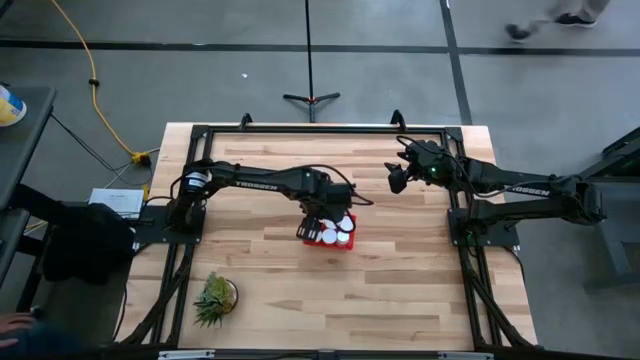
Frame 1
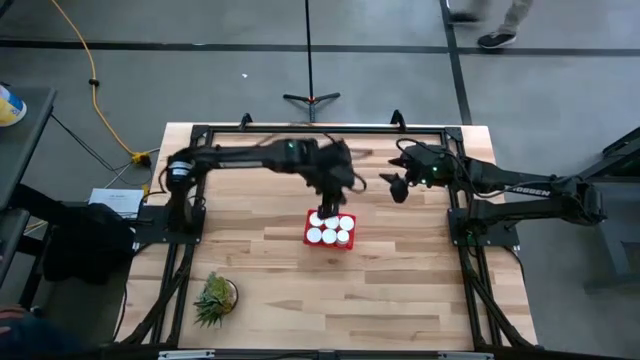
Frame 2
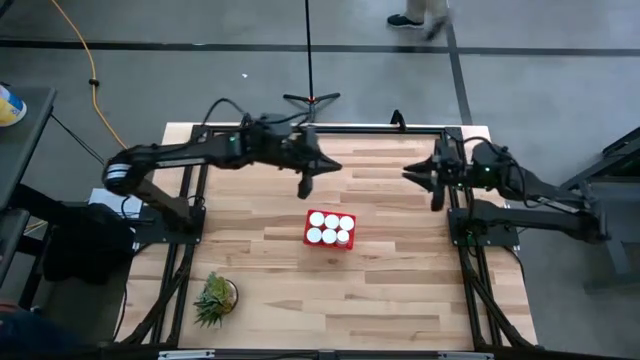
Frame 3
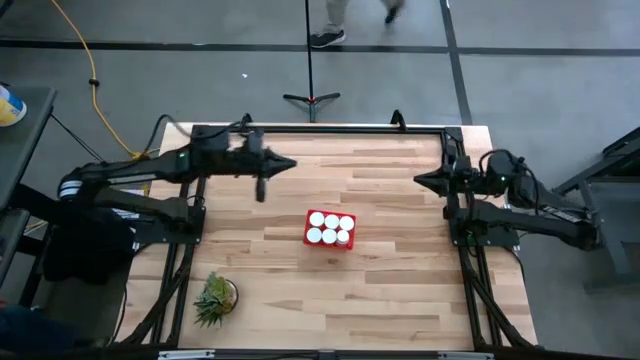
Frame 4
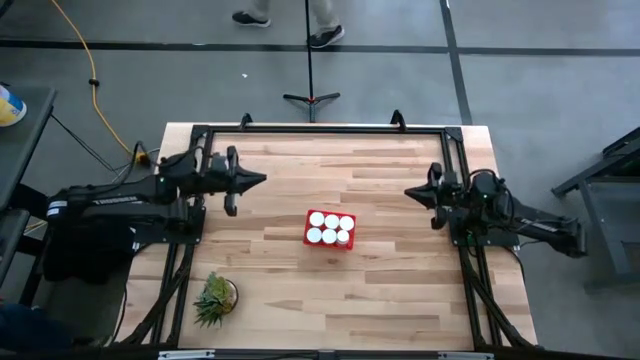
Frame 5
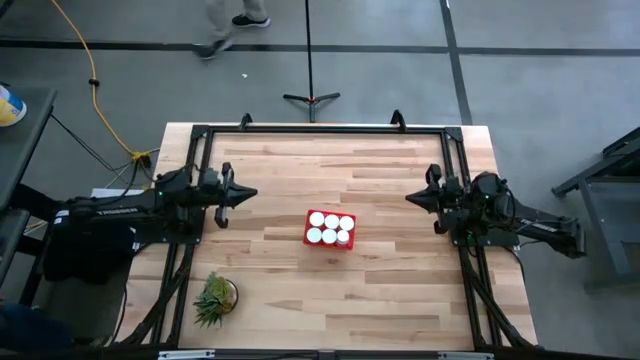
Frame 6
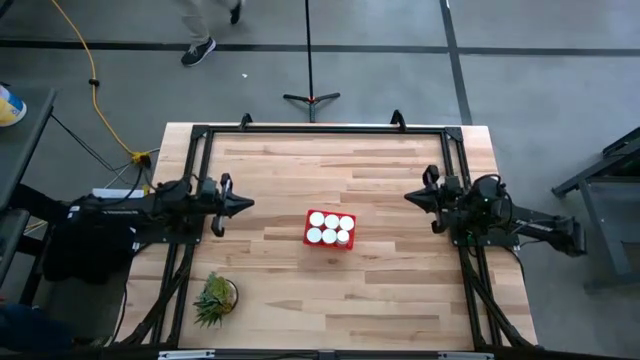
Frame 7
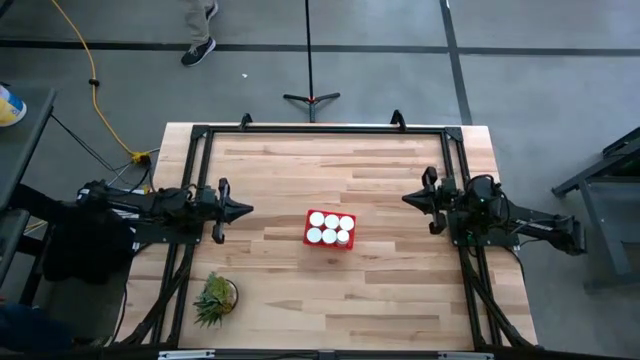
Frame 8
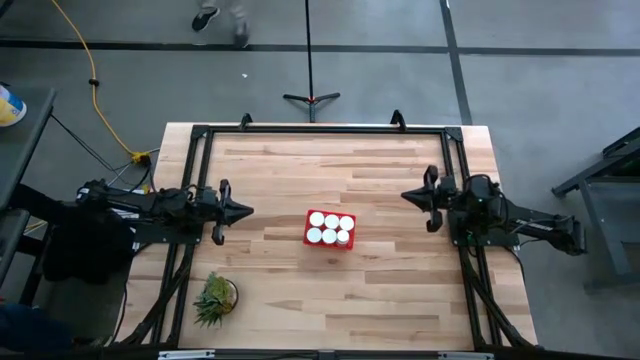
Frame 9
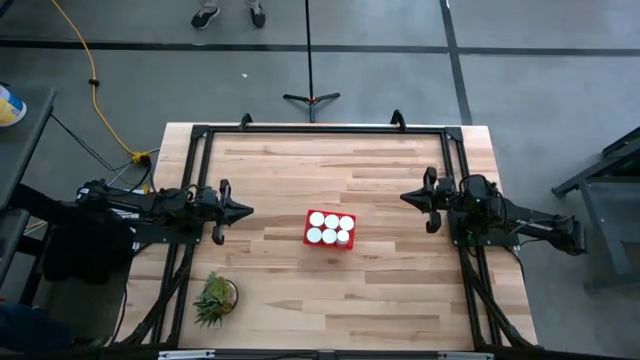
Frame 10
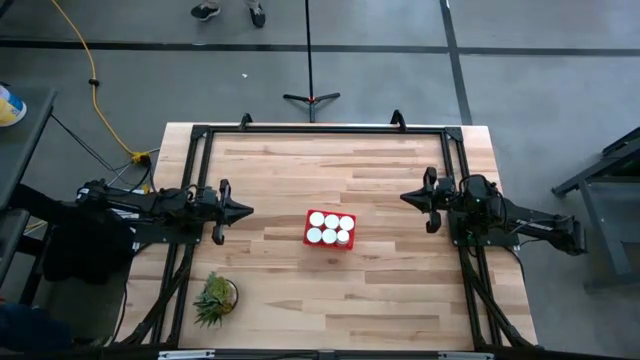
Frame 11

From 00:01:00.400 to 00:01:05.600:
Task: Pick and place pill bottles into a basket
Return to Home Position

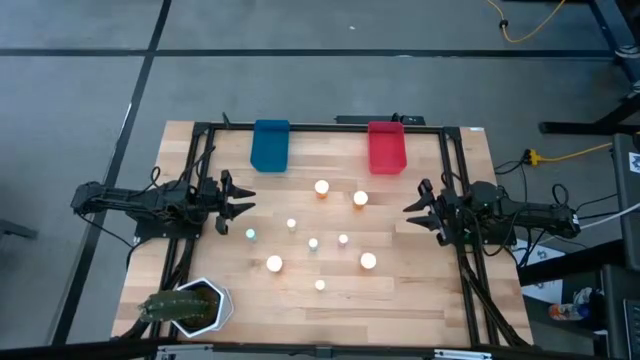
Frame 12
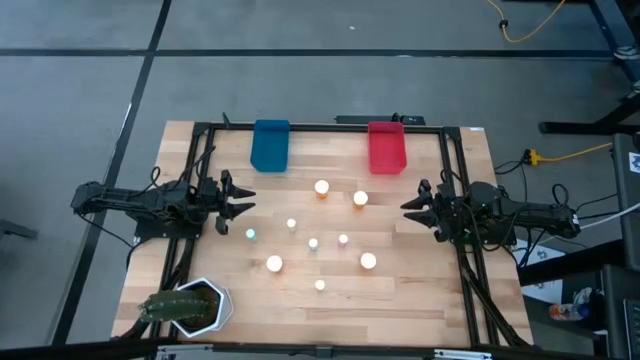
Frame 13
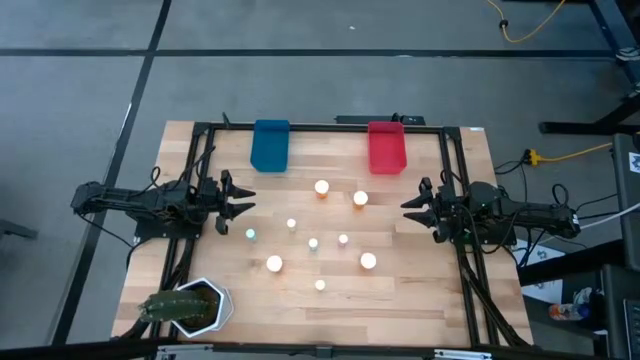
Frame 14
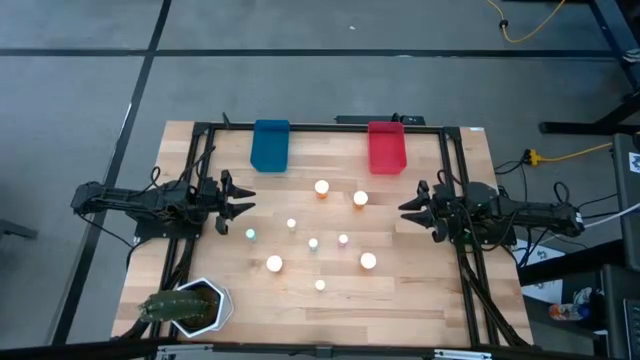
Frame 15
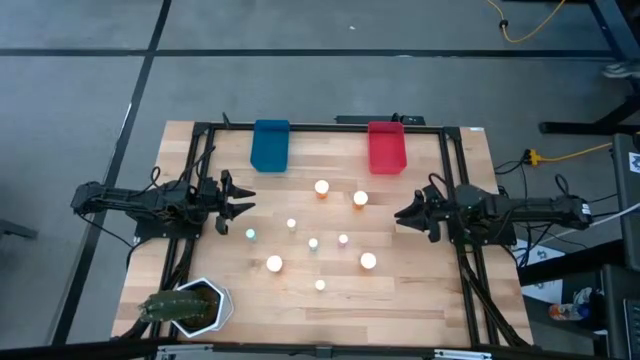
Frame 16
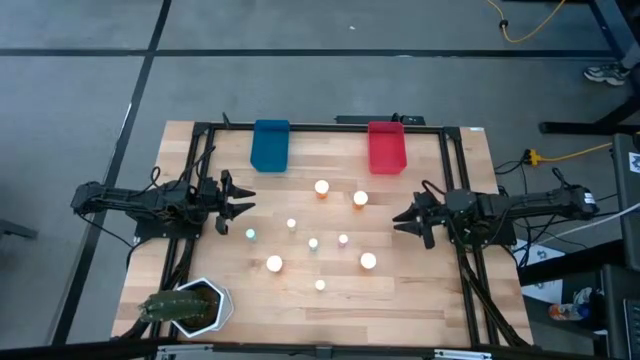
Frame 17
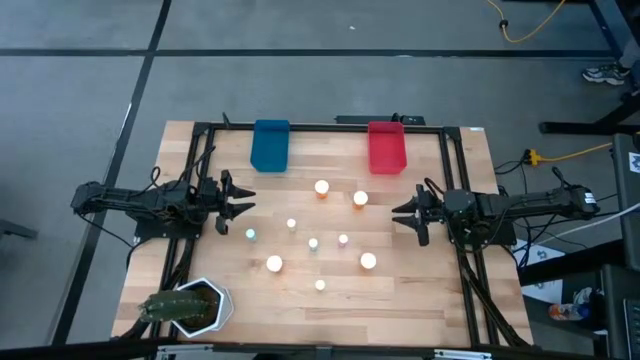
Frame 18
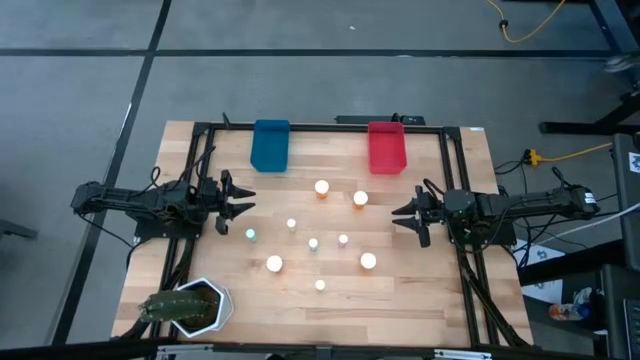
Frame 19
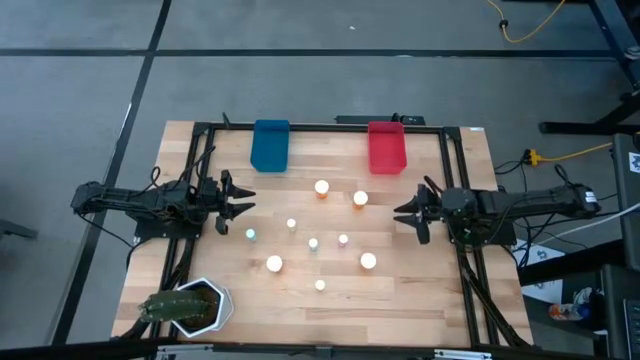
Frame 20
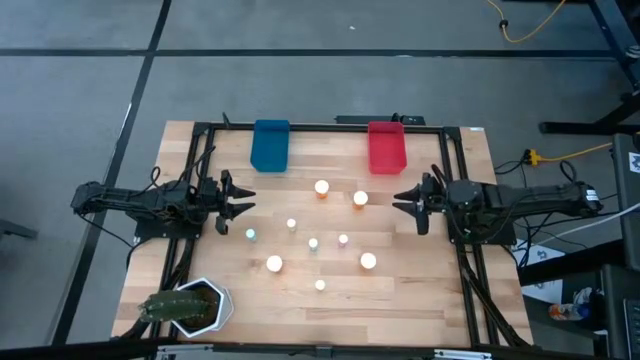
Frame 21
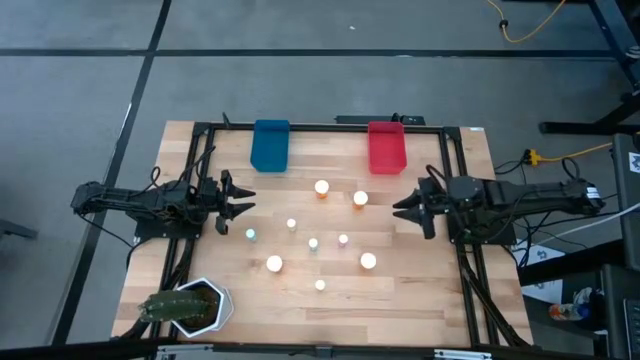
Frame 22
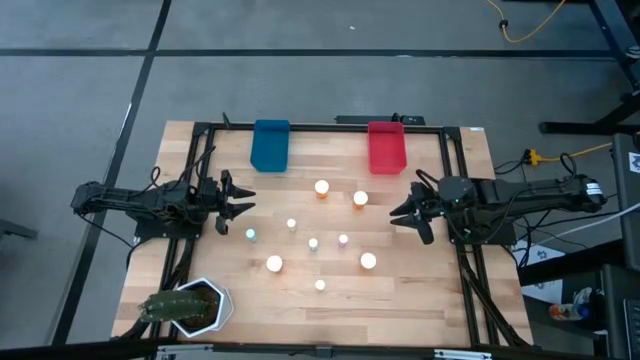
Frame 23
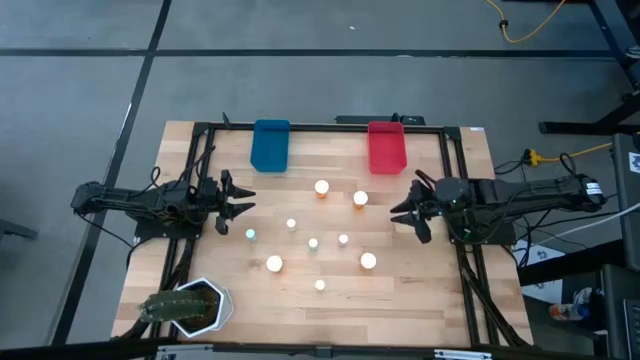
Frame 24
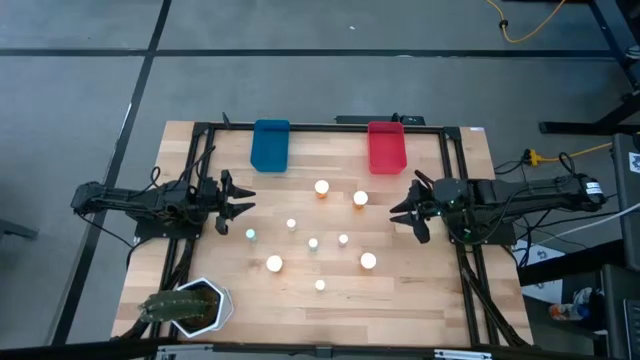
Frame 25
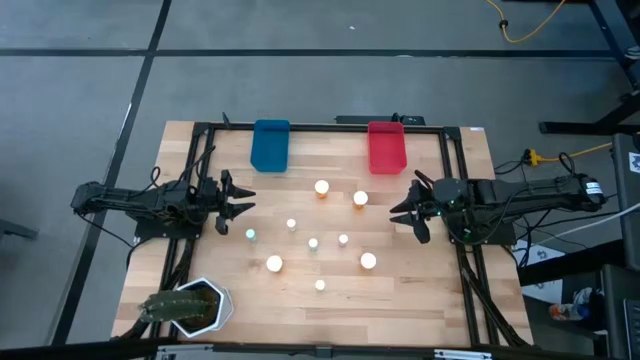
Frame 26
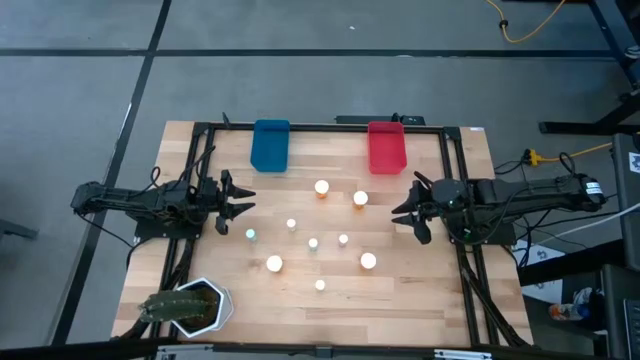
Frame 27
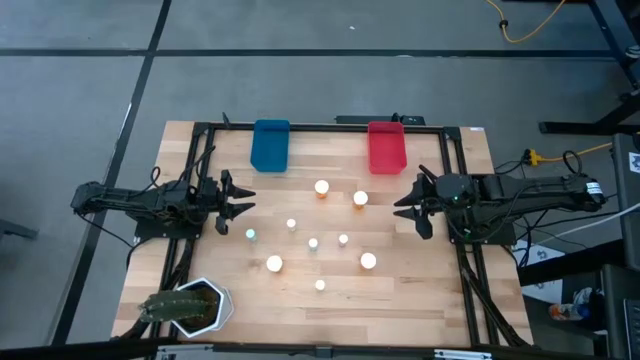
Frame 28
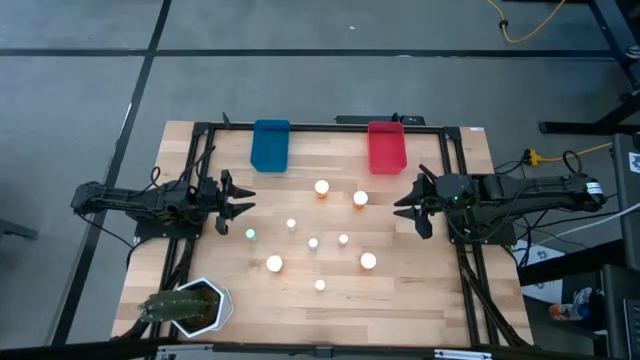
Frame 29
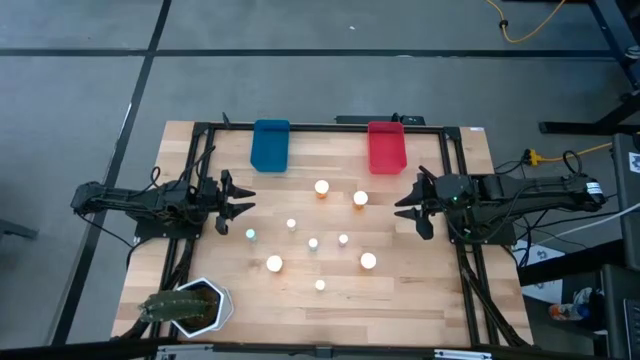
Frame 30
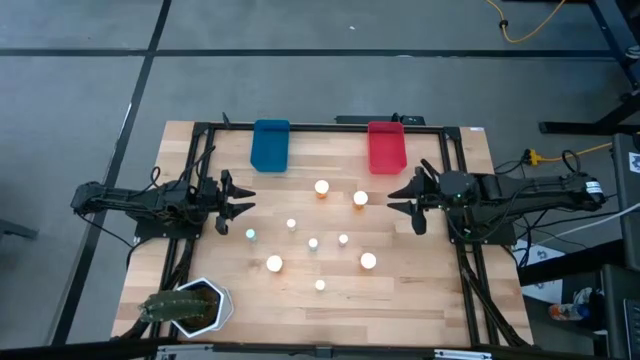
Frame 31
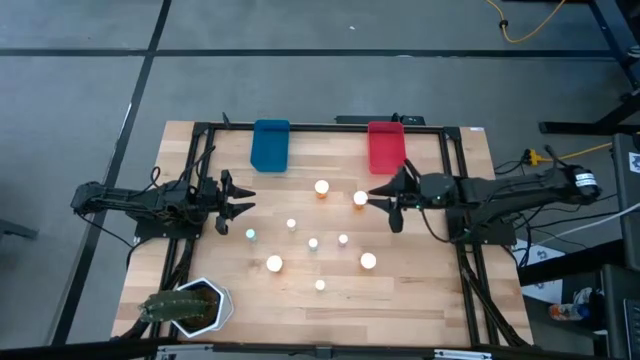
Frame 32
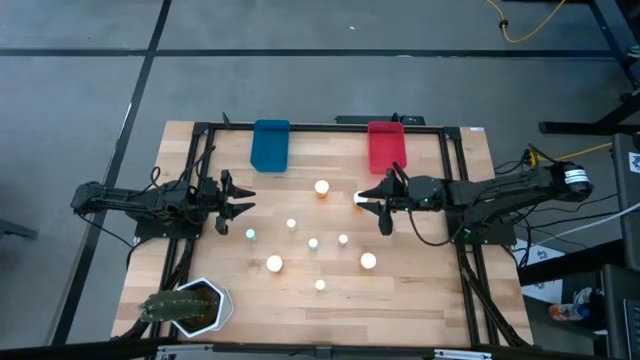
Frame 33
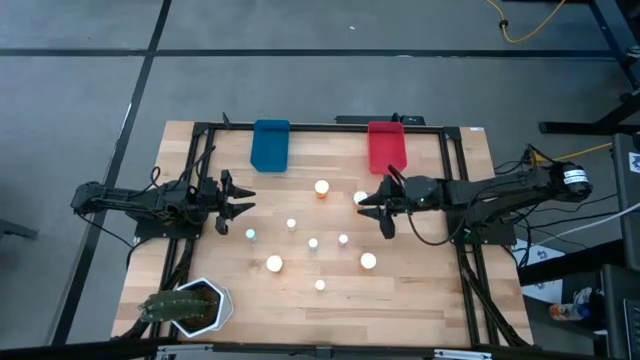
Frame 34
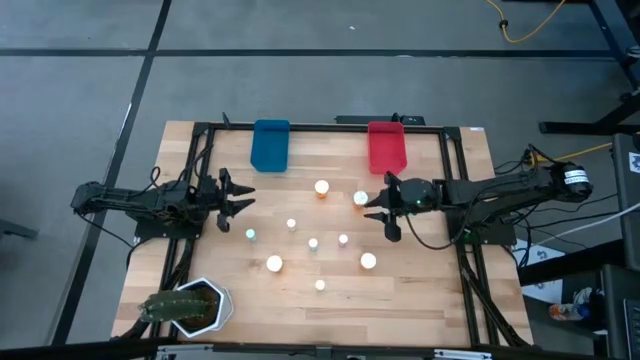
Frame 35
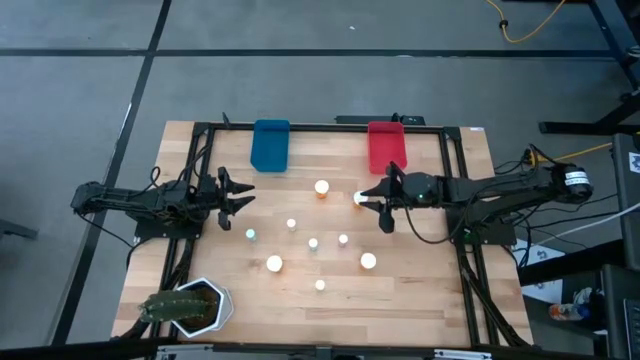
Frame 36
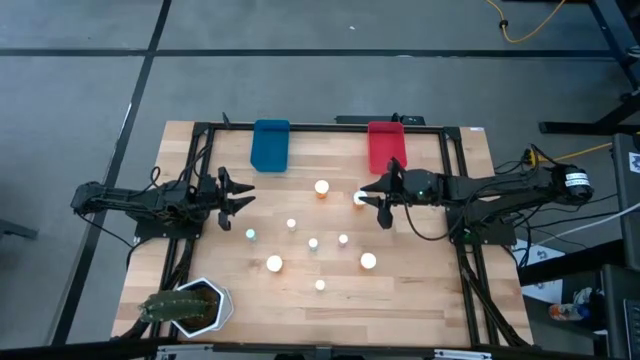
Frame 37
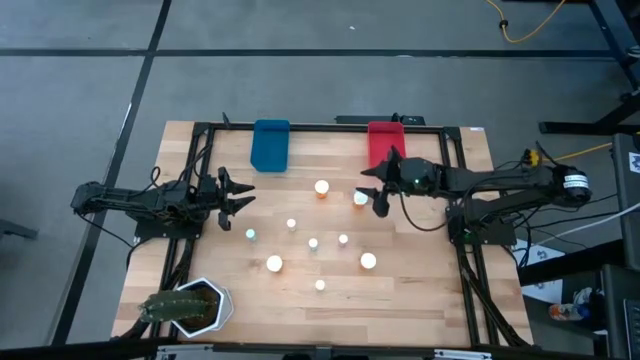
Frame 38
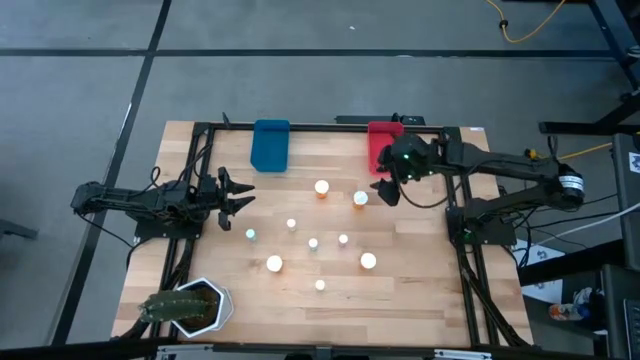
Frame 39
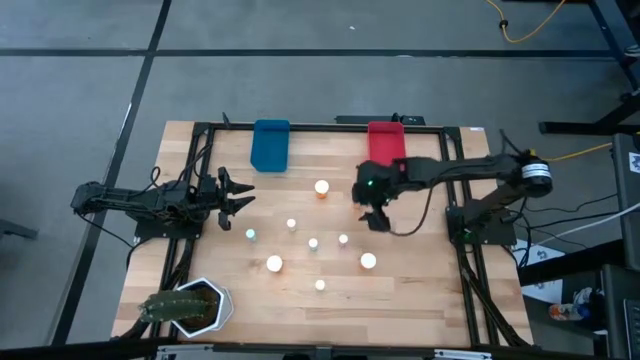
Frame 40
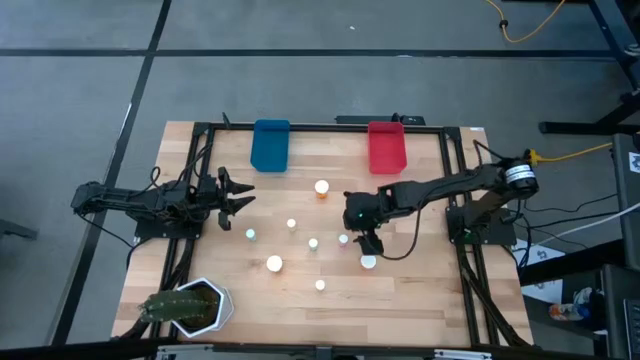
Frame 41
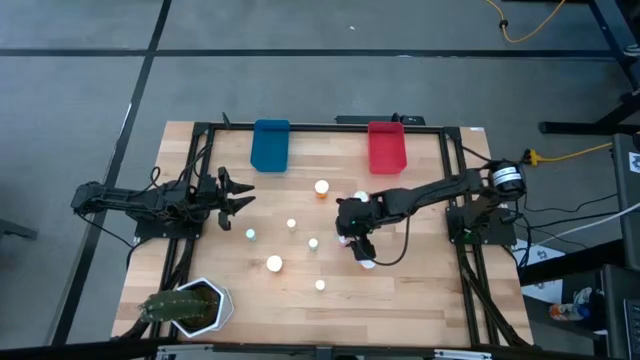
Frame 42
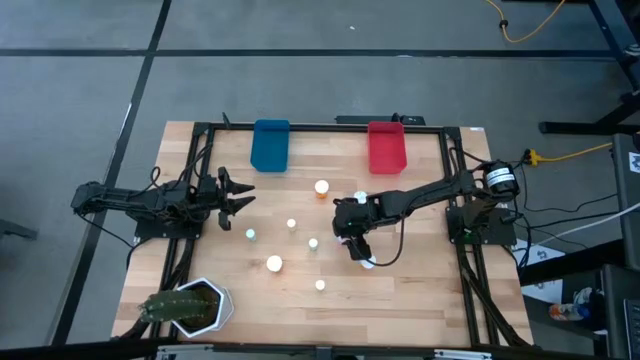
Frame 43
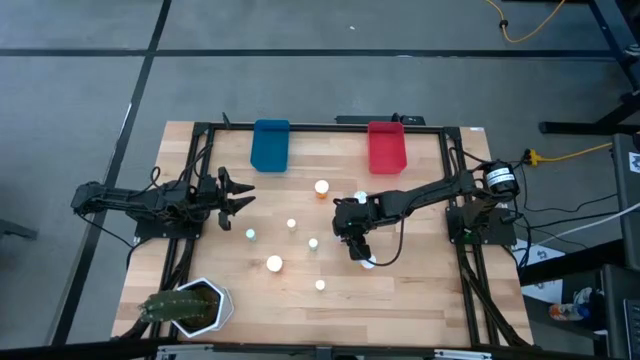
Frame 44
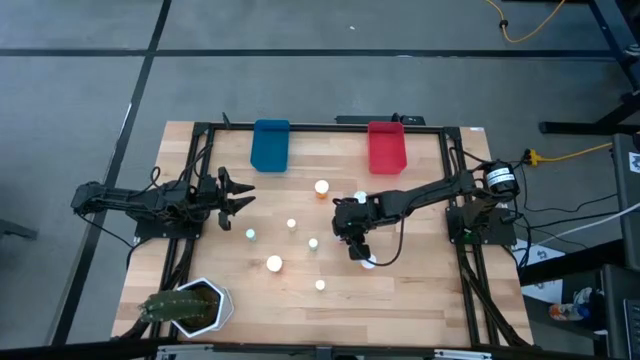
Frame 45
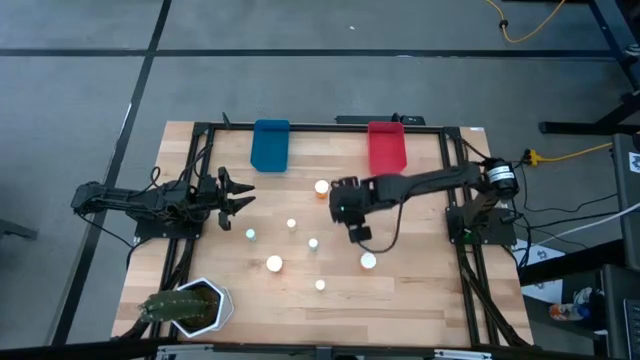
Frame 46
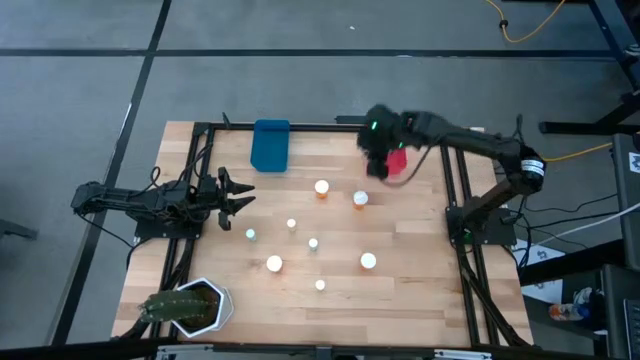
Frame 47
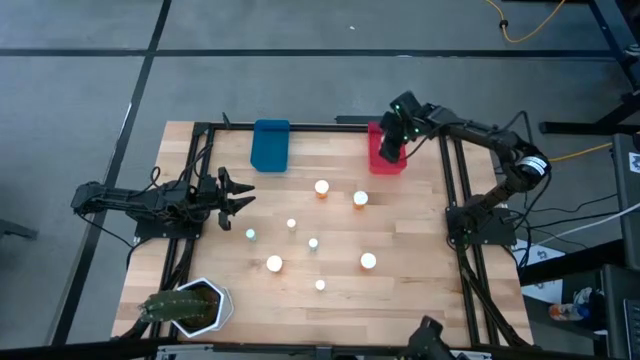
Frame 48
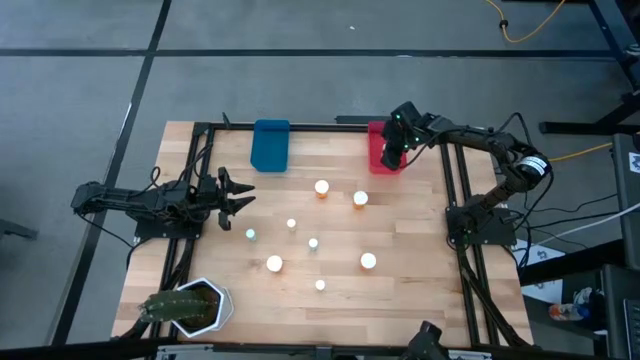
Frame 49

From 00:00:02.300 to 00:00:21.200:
Task: Pick and place medicine bottles into bin by pill shape (circle, oval)
Put the small purple pill bottle into the red bin
